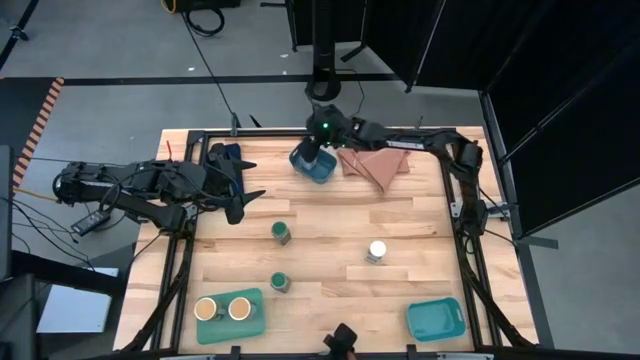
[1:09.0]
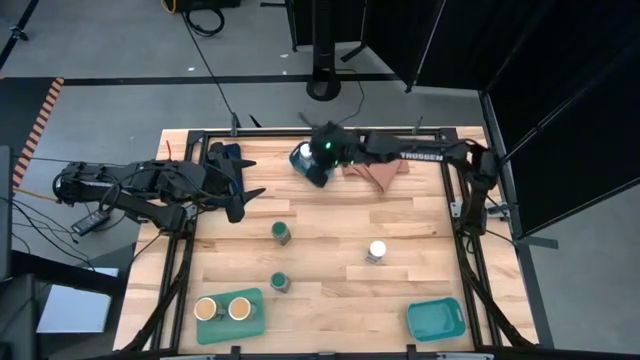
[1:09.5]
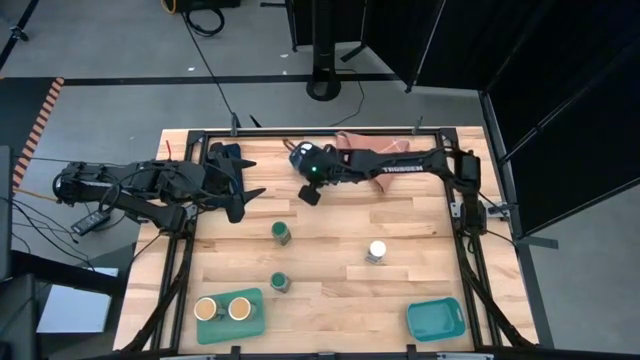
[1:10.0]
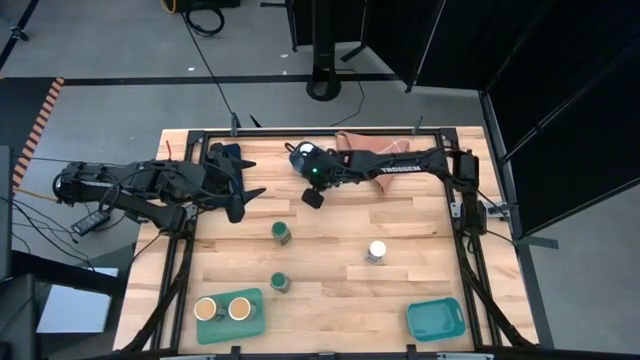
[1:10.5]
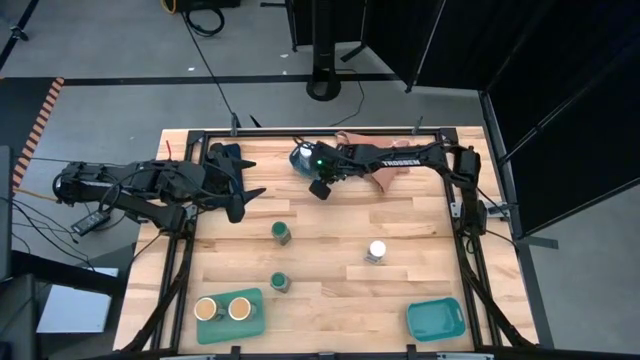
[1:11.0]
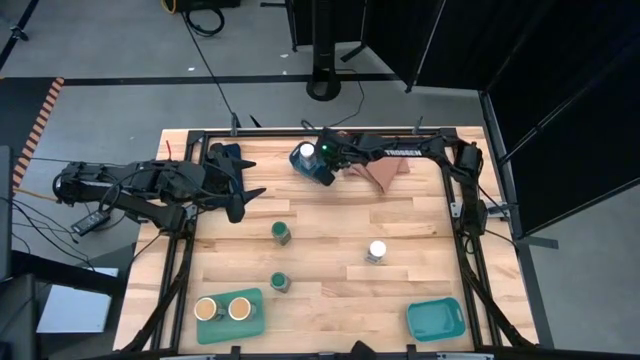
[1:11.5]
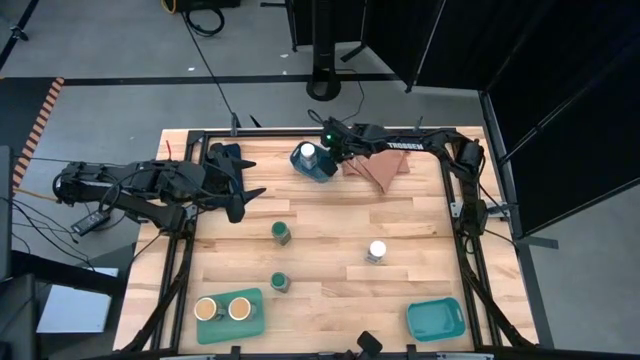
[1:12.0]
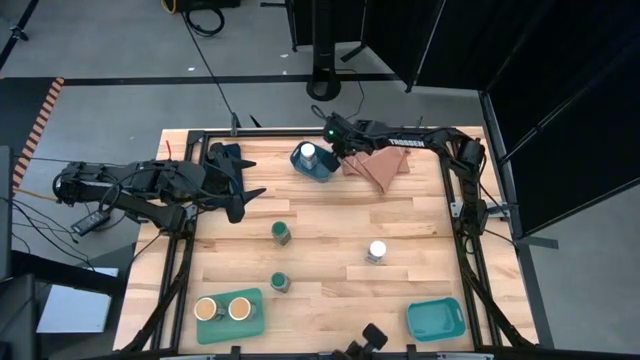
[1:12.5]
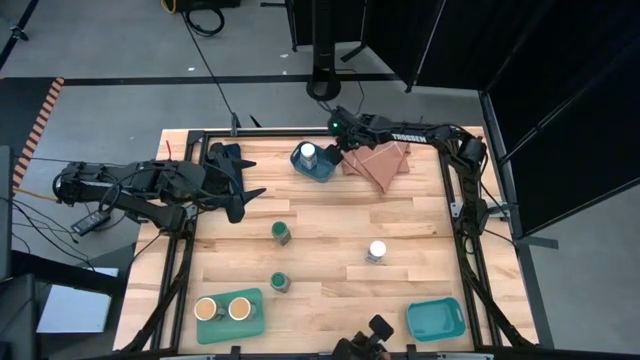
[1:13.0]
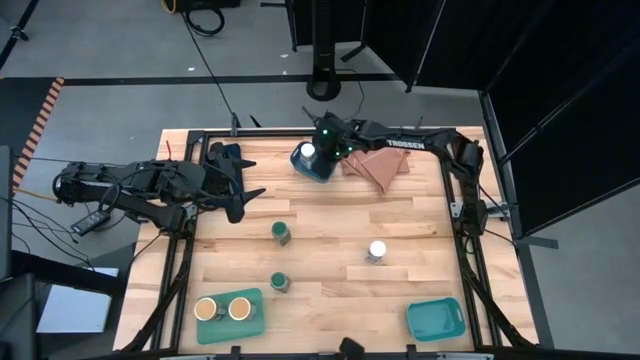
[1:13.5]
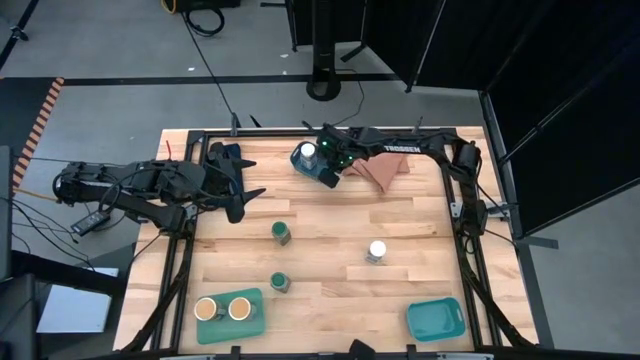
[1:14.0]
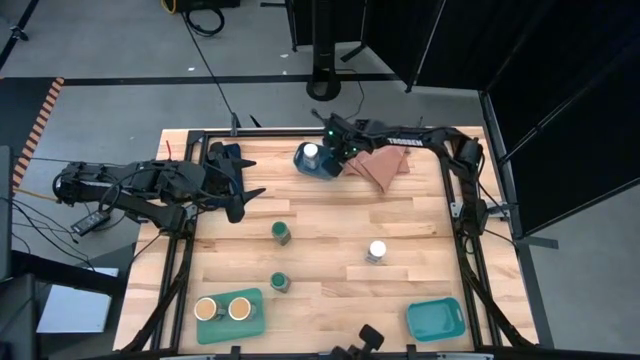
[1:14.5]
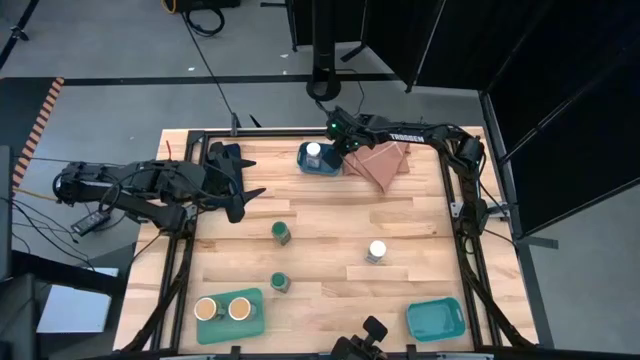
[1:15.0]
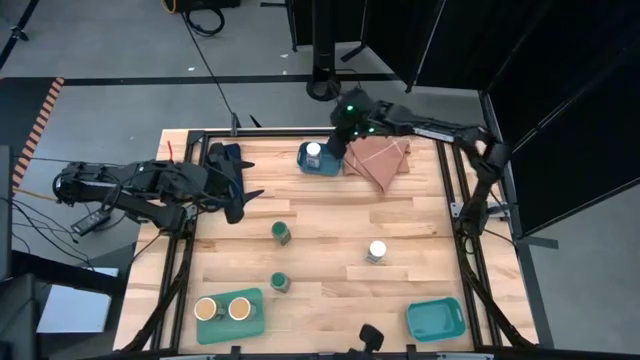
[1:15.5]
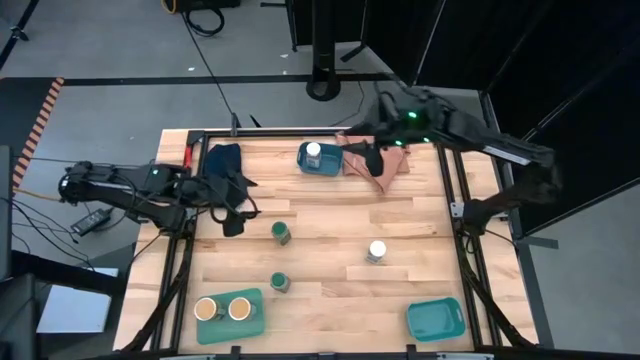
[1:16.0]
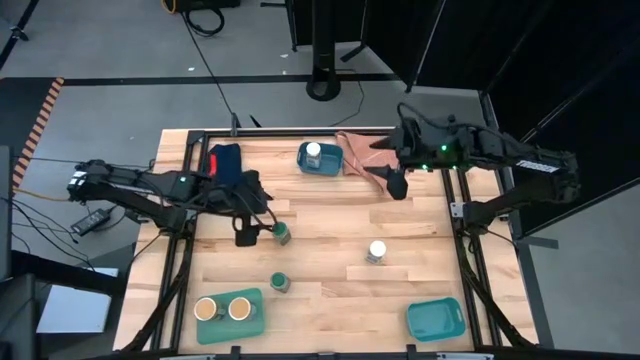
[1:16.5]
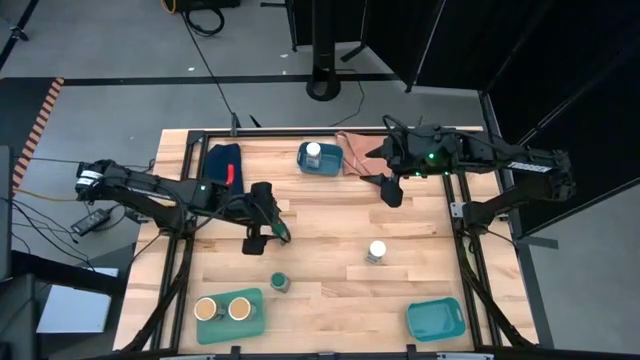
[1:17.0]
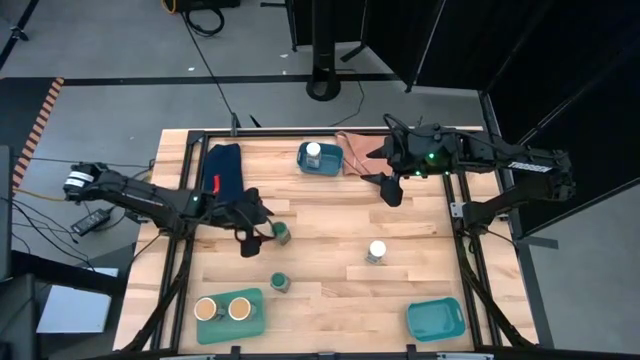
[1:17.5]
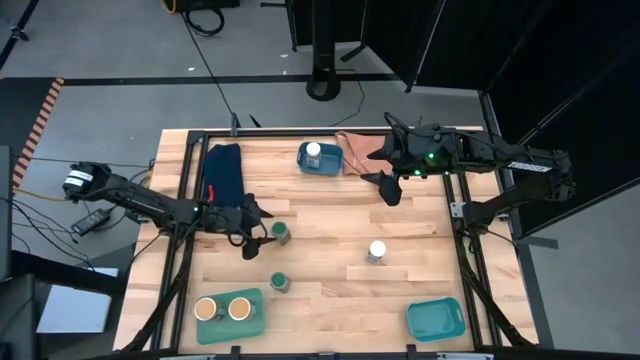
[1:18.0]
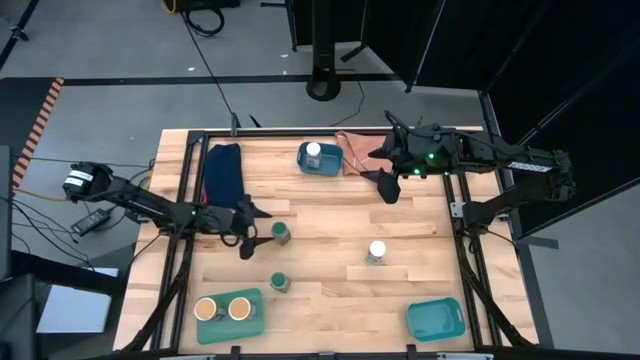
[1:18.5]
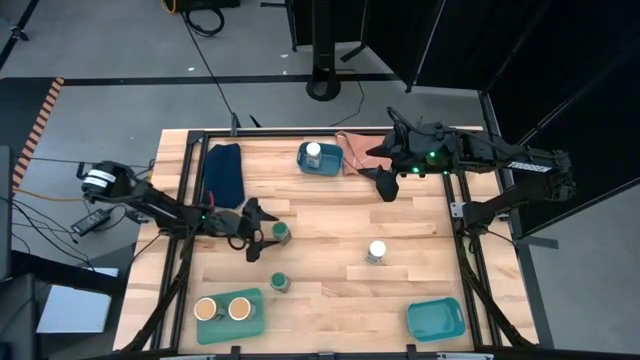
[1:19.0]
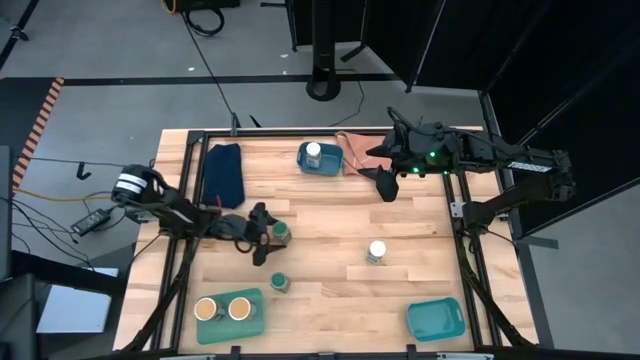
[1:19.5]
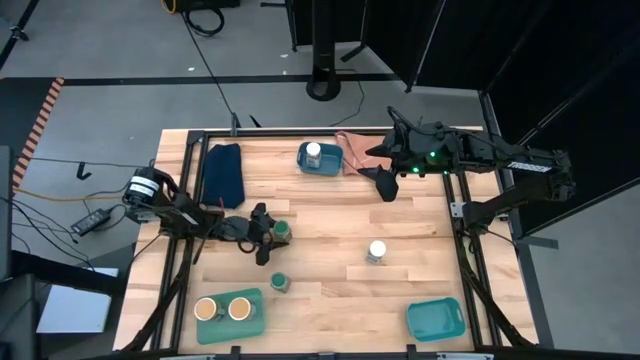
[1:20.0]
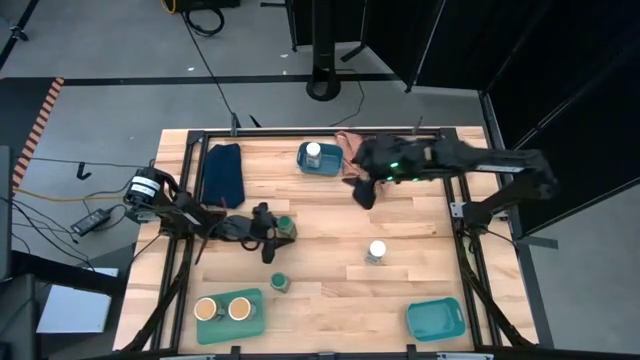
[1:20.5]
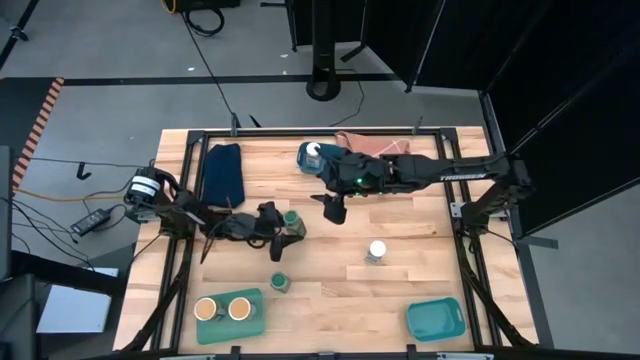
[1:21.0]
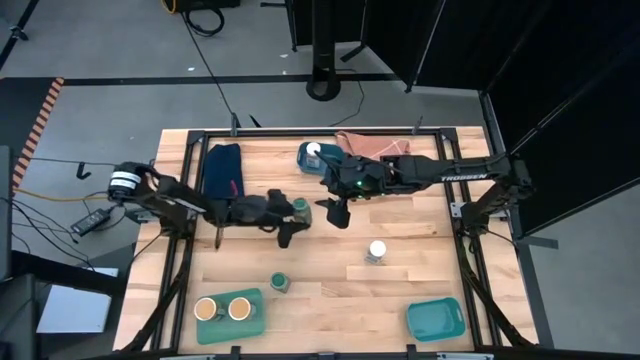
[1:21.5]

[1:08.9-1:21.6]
Task: Sort spices by type
Put the top green seasoning bottle into the green bin

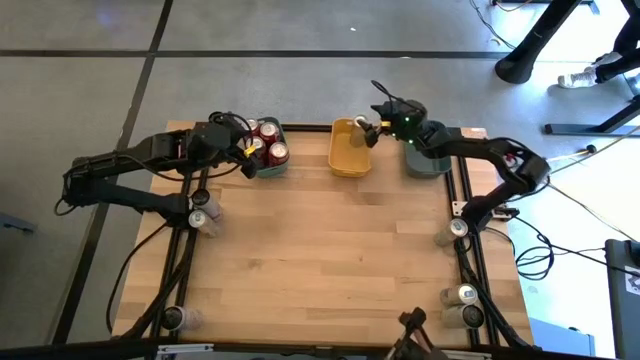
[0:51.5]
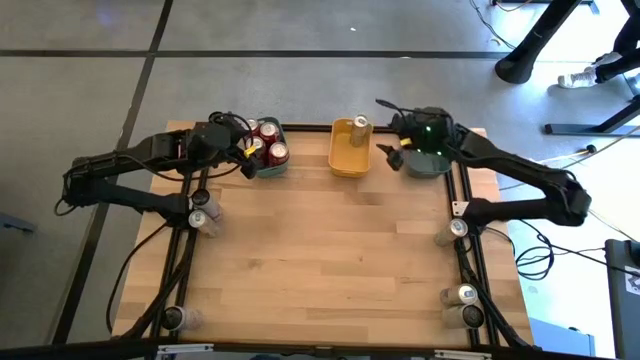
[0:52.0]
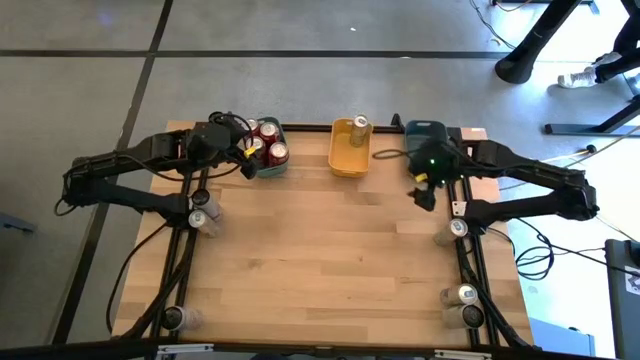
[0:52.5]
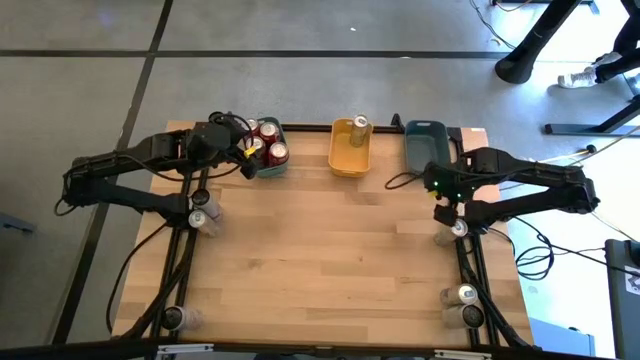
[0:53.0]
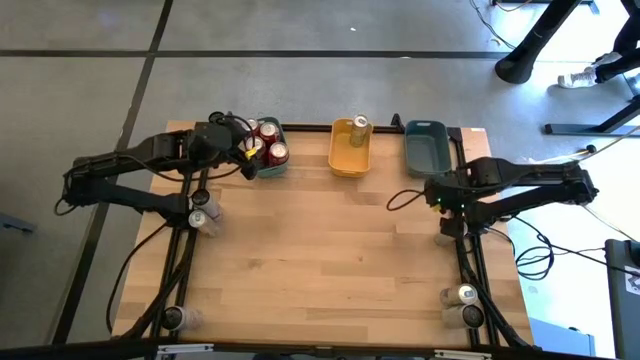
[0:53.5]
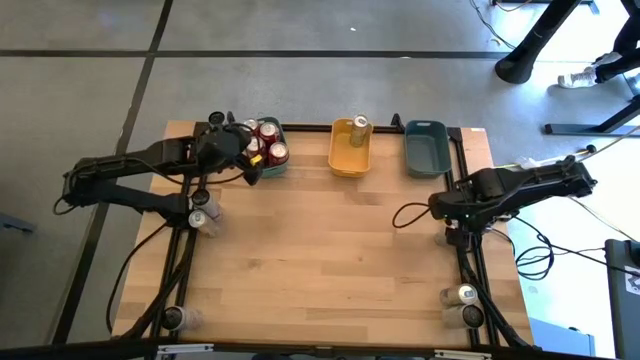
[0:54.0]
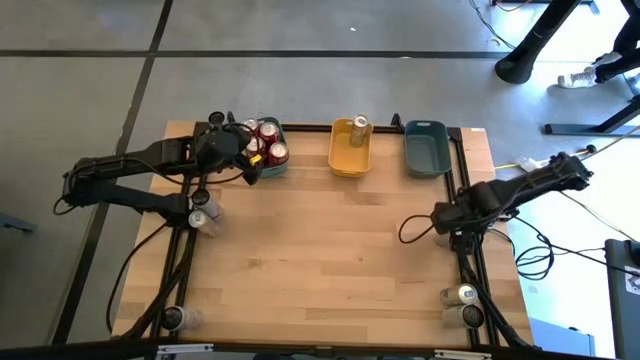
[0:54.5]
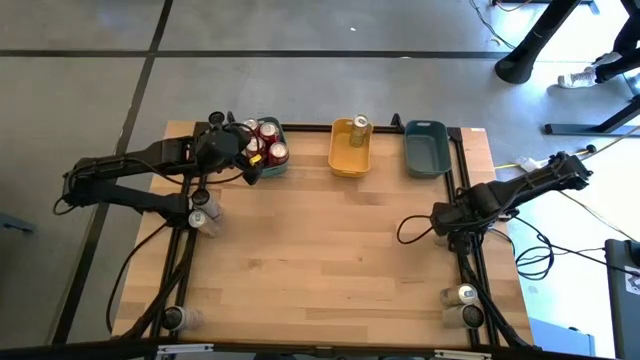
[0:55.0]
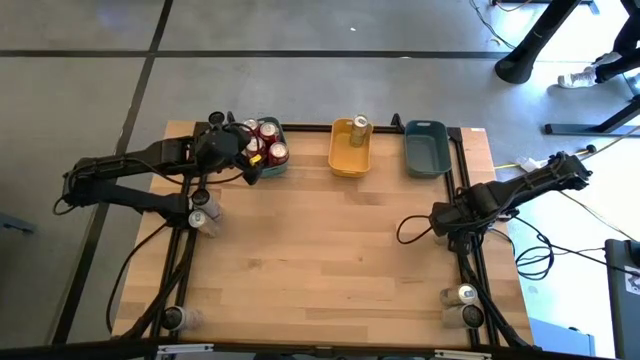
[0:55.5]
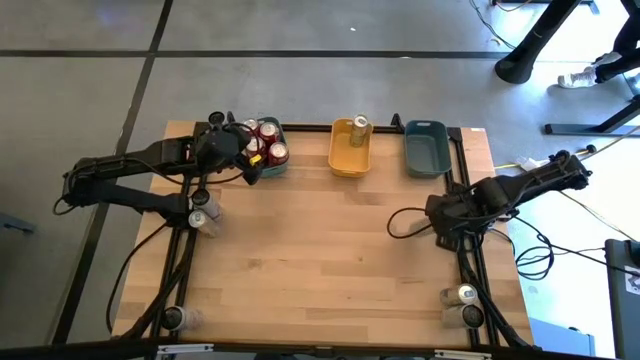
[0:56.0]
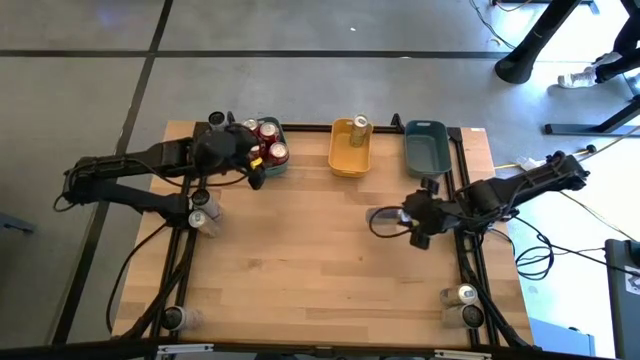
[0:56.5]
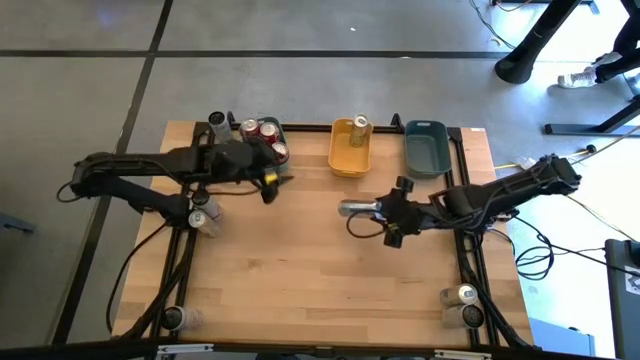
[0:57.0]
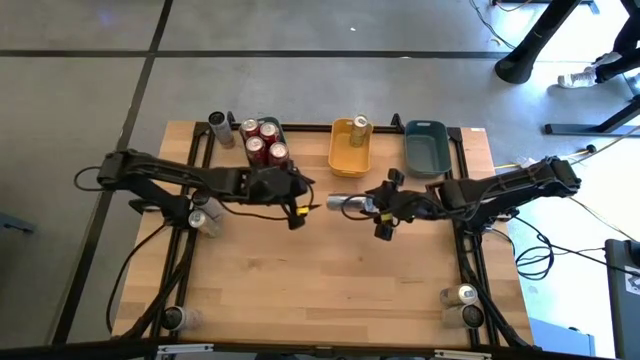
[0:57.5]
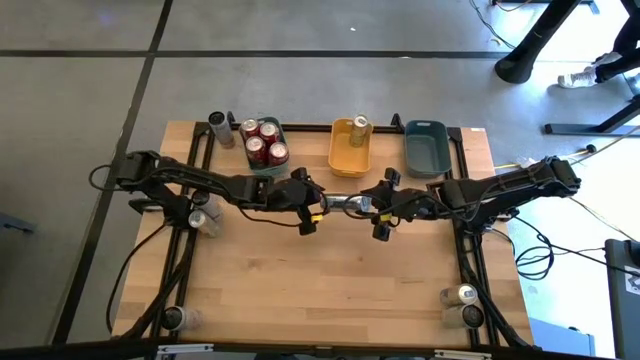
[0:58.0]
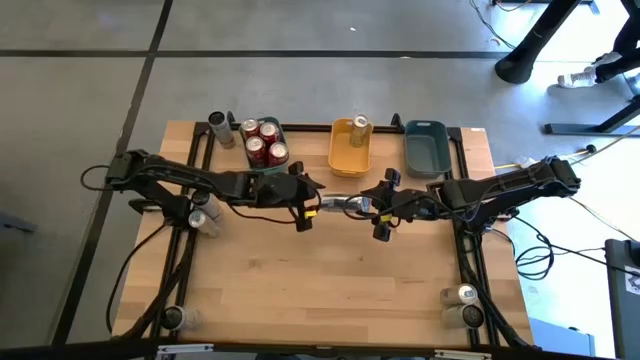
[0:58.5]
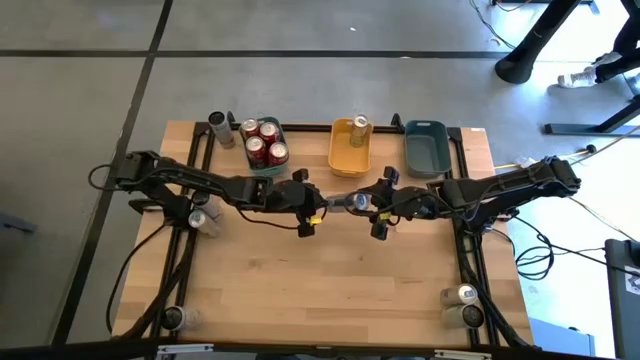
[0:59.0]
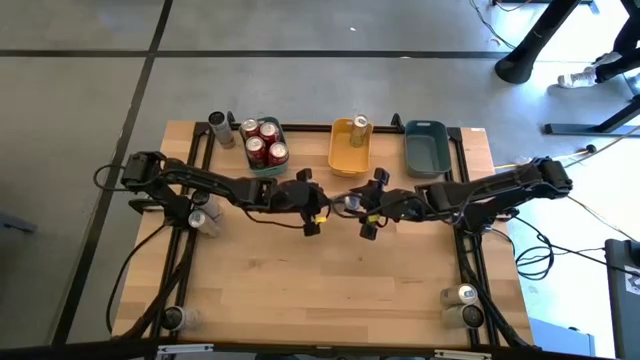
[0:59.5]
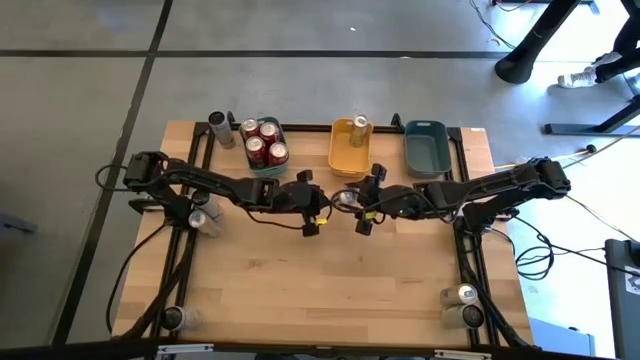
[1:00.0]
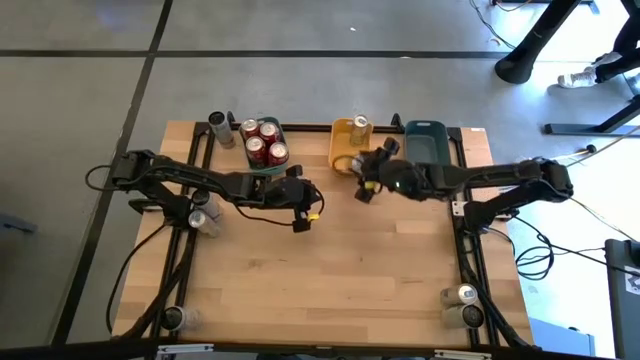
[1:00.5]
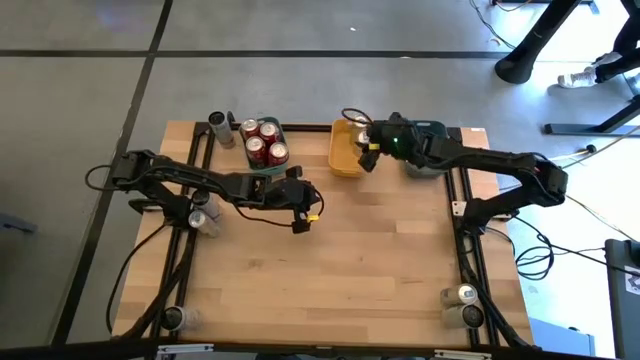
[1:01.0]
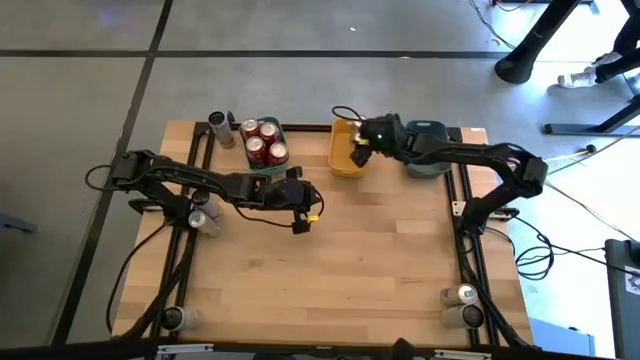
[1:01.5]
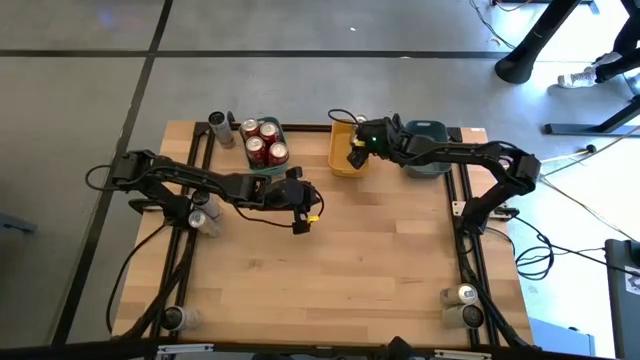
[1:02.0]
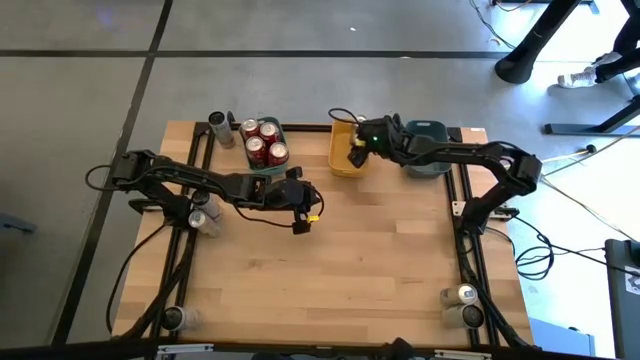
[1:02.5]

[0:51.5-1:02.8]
Task: Sort soda cans
Put the top right blue soda can into the yellow bin
